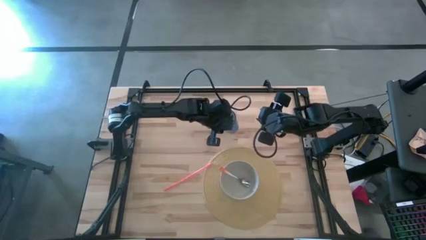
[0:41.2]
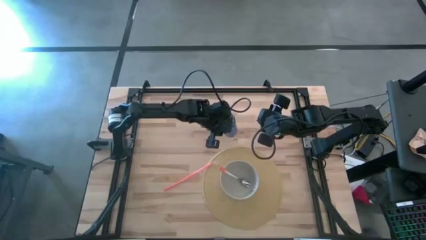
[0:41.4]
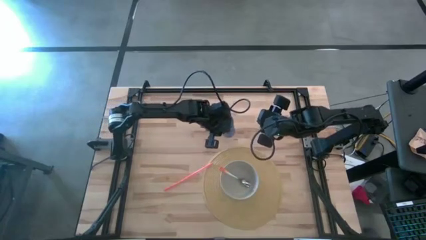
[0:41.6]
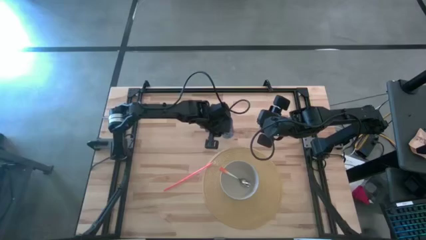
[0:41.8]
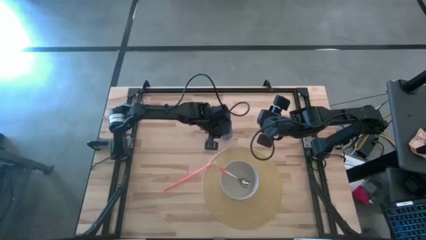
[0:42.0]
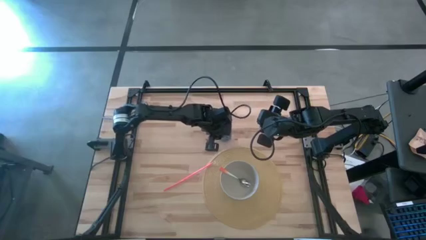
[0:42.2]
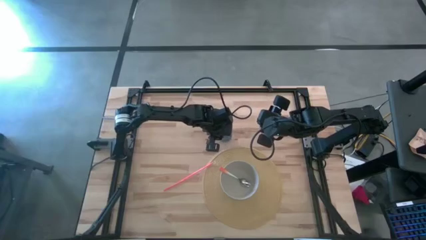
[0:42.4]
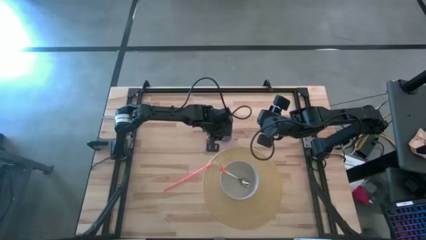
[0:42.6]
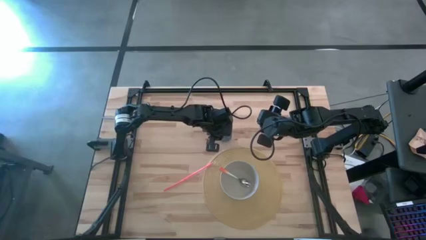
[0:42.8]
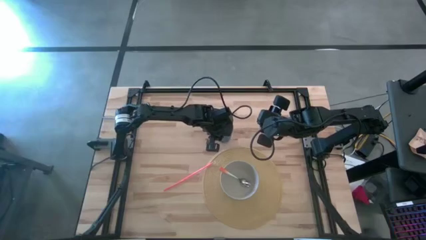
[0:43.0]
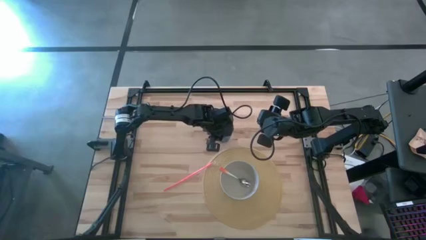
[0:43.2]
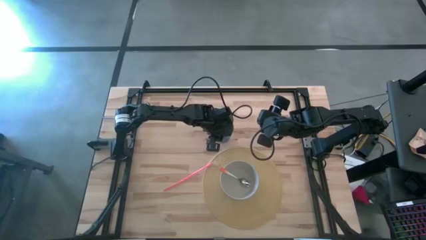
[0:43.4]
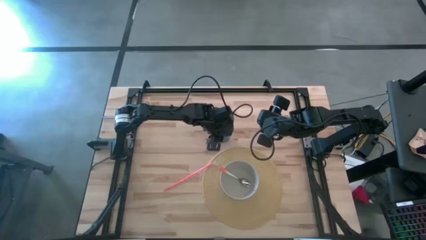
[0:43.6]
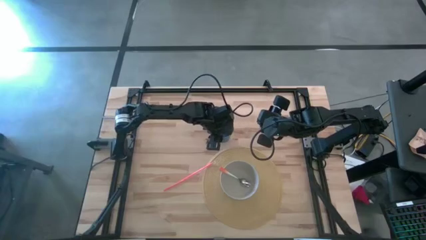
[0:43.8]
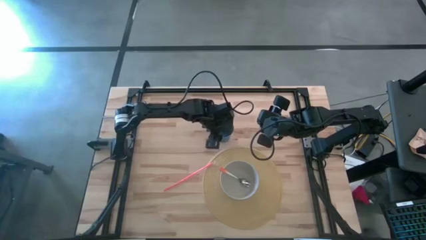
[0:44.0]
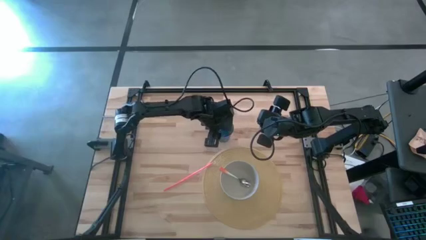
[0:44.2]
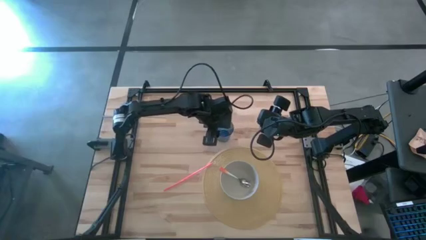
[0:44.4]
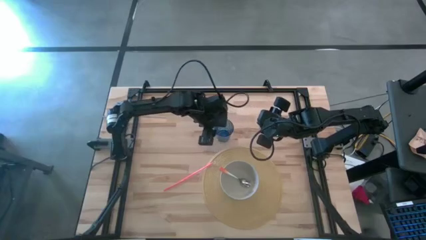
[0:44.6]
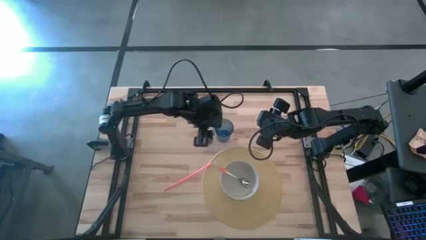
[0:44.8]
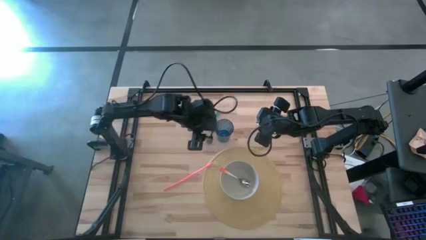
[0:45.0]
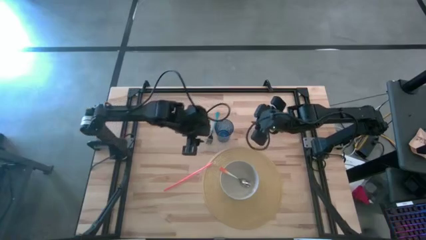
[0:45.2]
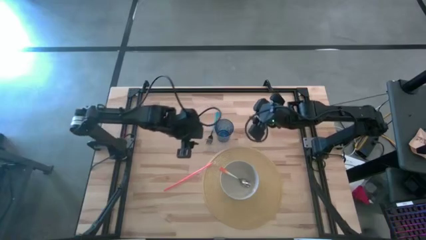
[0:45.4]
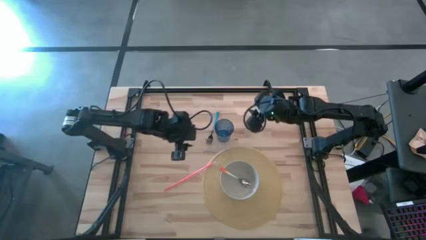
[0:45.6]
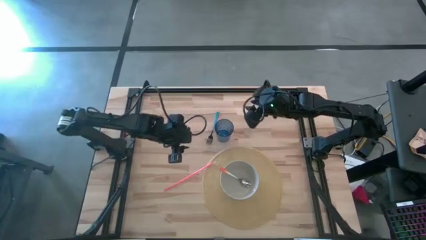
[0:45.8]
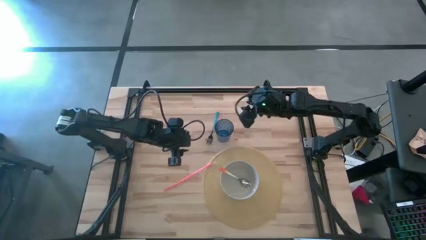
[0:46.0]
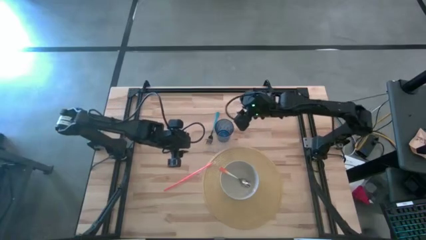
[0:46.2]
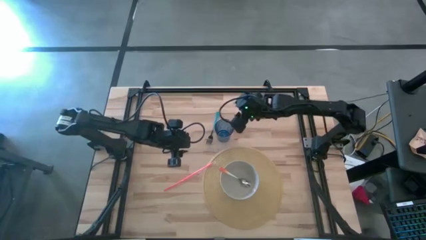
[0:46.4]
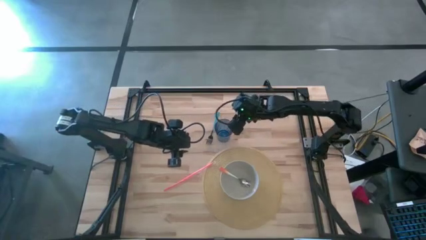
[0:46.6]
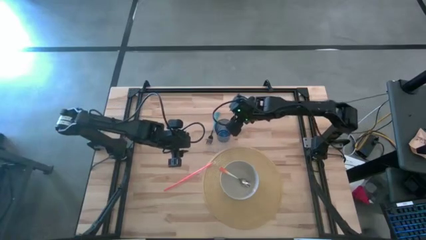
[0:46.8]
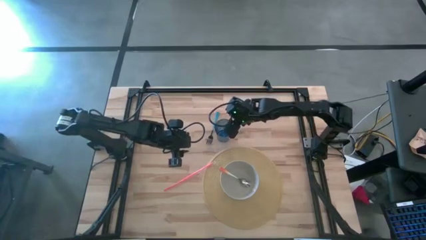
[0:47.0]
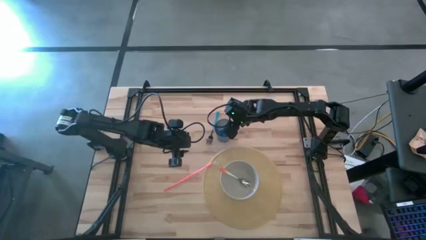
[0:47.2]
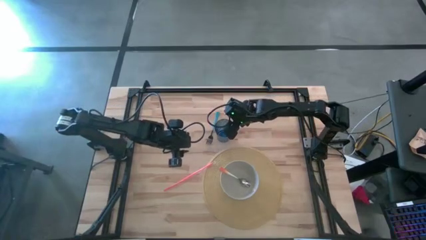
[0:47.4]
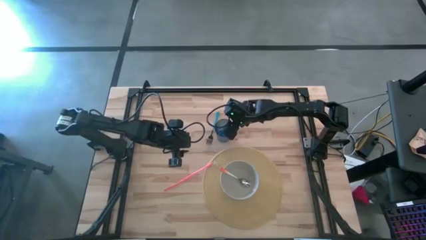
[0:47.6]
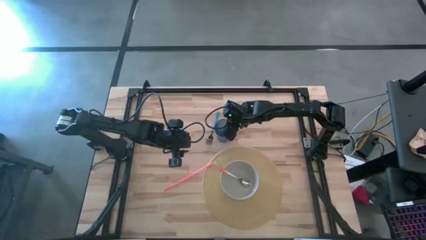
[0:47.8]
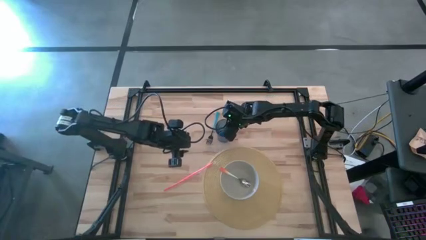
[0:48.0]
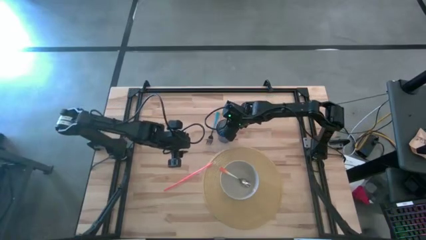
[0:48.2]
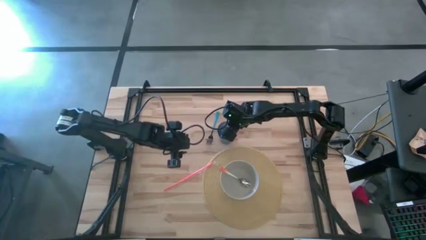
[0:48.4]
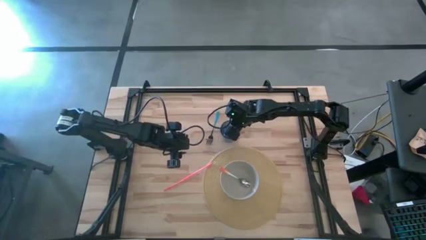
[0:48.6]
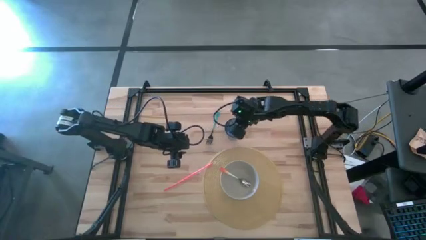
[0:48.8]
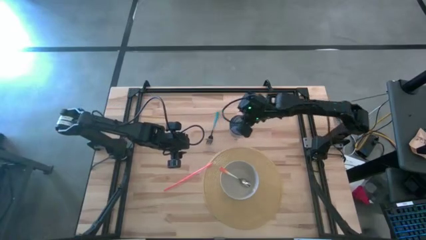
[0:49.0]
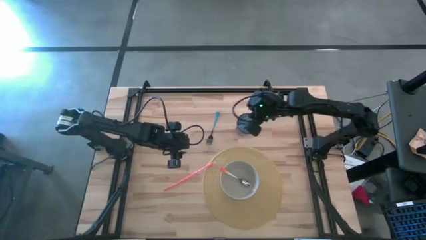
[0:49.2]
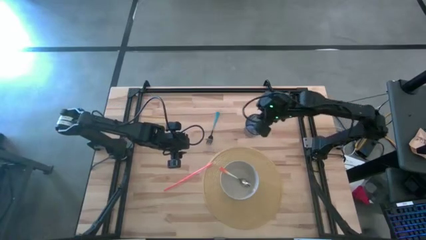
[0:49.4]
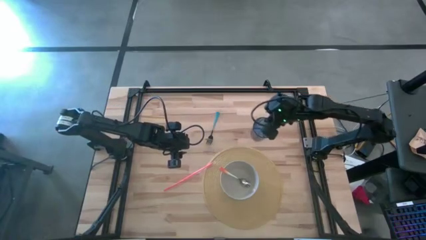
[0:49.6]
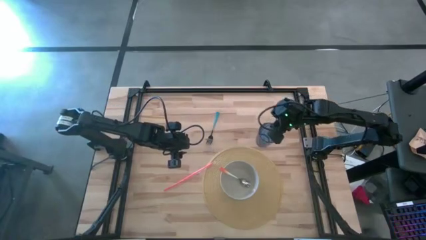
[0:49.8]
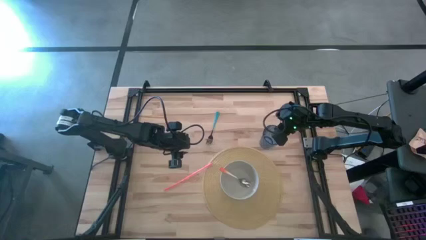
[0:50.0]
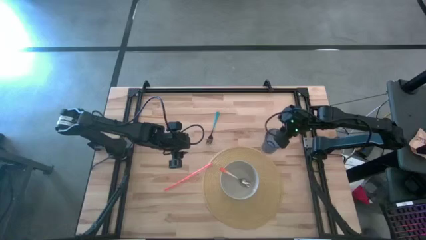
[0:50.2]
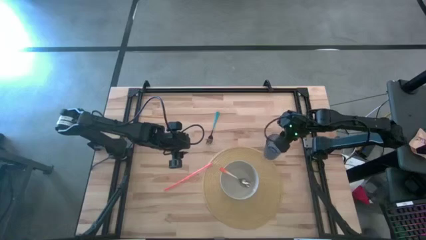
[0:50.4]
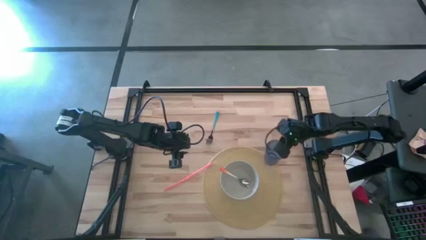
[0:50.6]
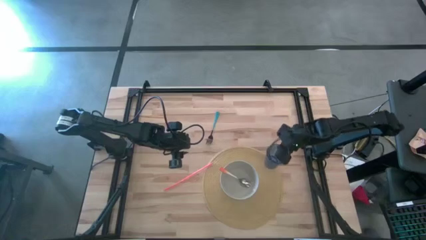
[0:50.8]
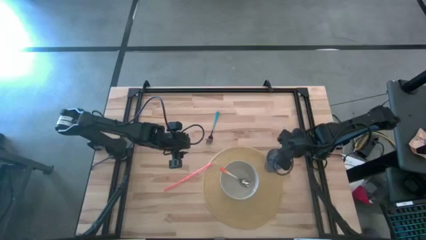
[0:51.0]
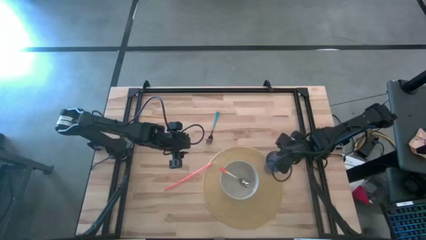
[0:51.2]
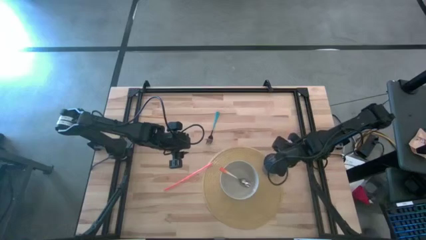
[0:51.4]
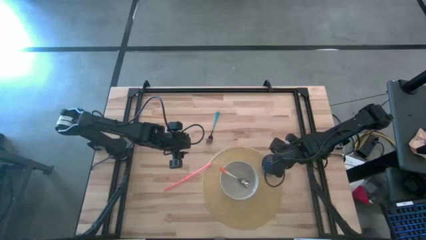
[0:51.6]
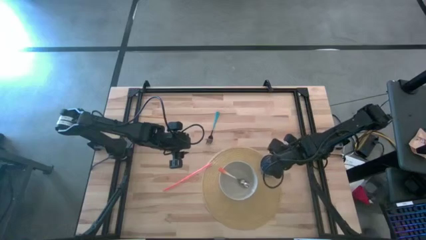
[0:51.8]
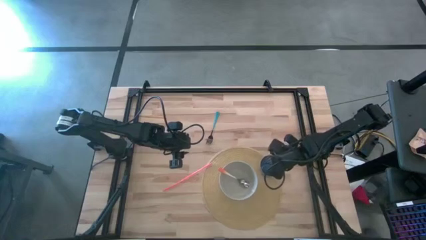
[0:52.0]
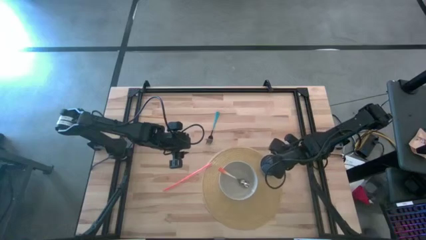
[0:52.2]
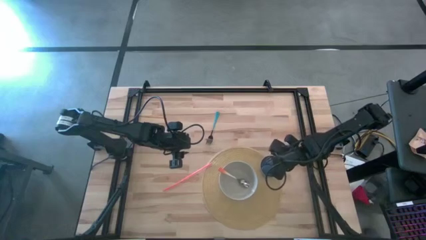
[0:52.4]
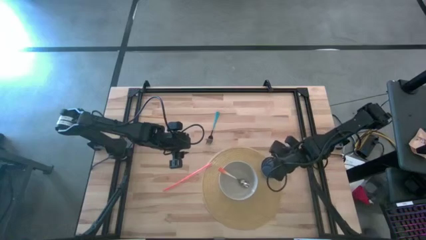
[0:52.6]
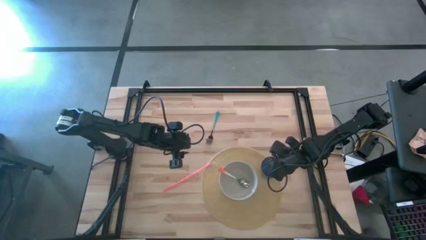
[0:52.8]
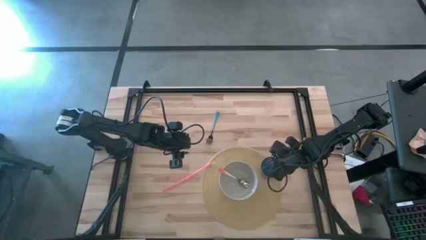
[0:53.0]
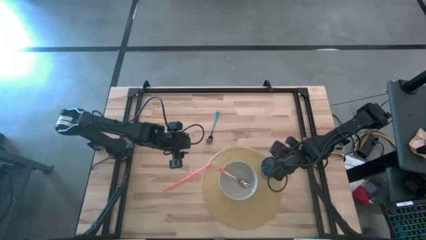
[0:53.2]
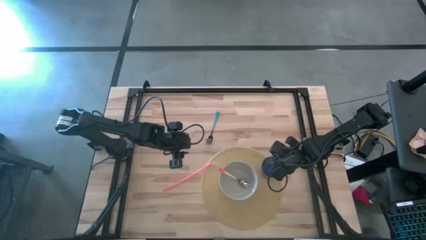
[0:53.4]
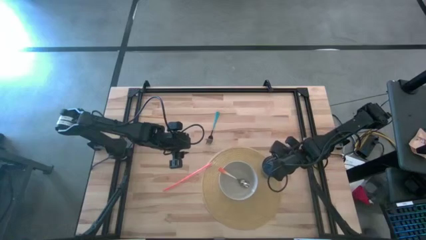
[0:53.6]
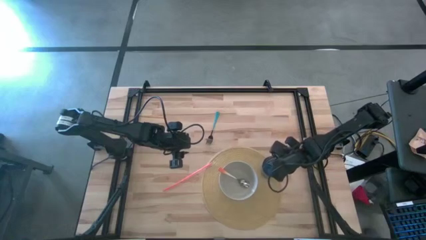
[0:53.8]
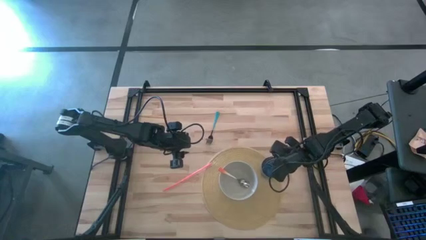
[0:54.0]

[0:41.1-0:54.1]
Task: Pick & Place Utensil
Put the blue cup on the yellow mat

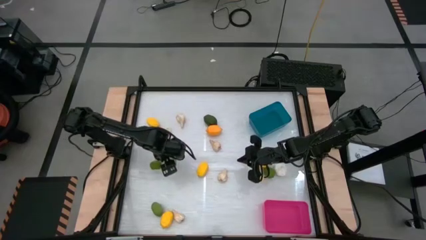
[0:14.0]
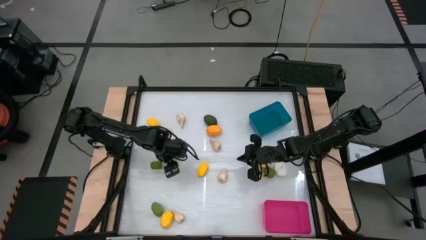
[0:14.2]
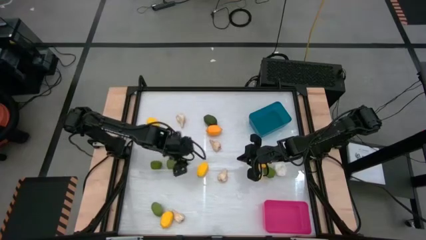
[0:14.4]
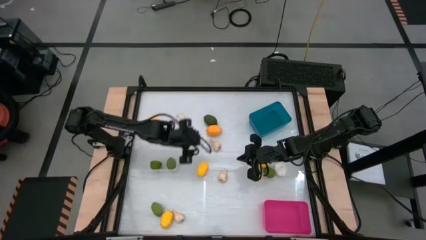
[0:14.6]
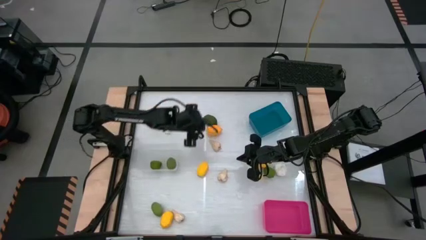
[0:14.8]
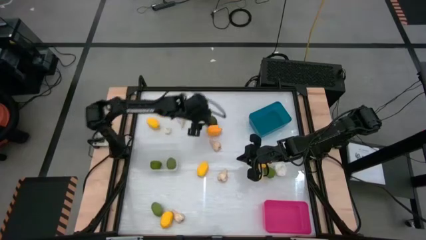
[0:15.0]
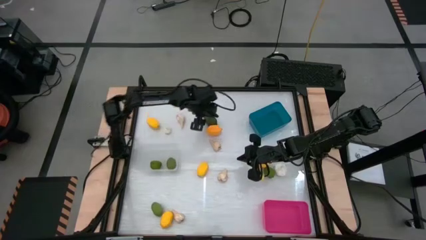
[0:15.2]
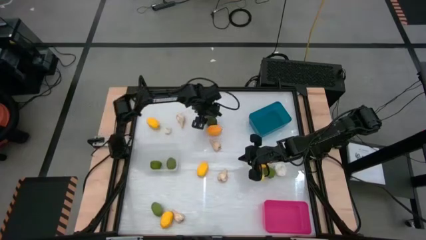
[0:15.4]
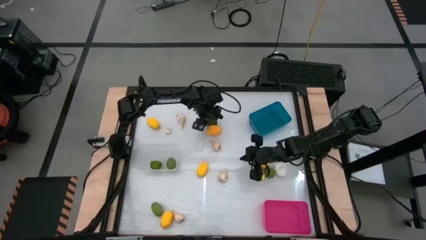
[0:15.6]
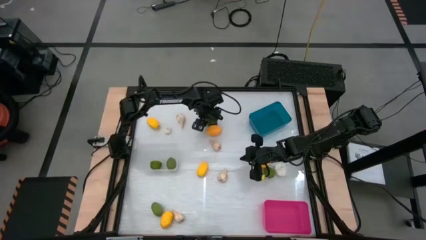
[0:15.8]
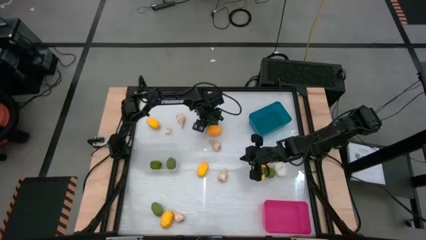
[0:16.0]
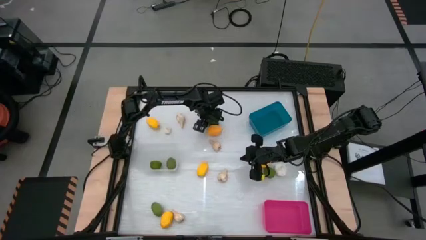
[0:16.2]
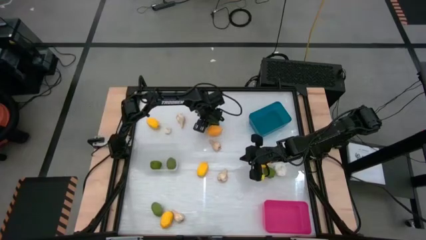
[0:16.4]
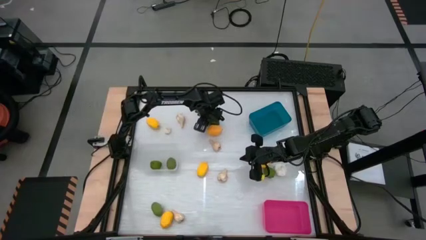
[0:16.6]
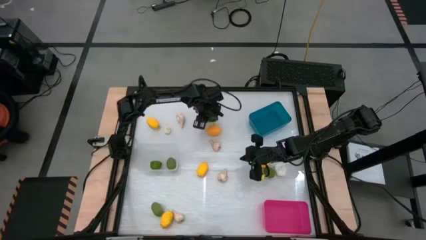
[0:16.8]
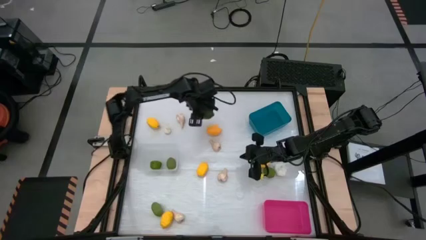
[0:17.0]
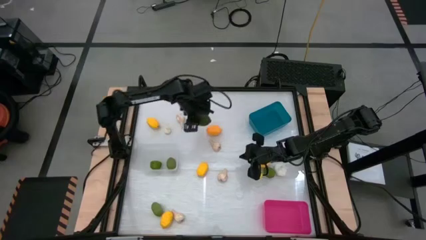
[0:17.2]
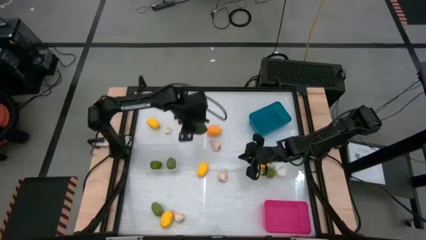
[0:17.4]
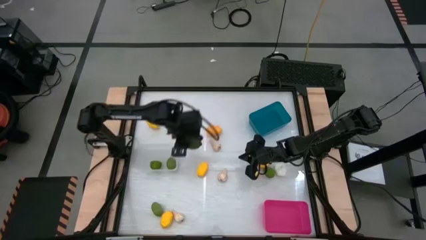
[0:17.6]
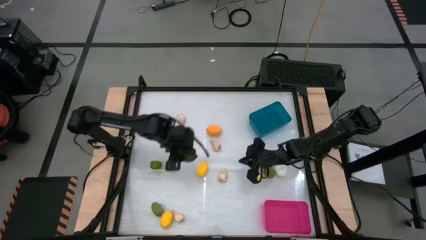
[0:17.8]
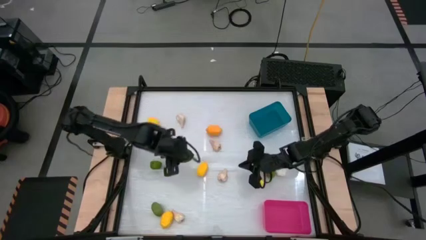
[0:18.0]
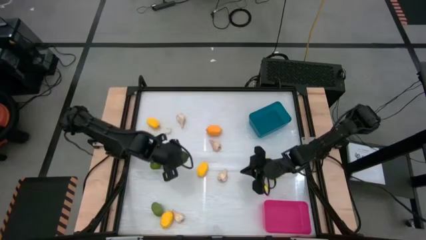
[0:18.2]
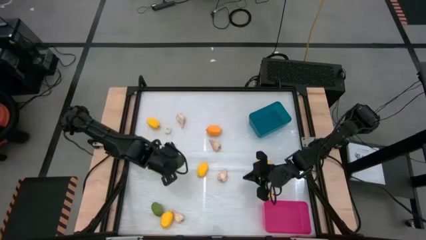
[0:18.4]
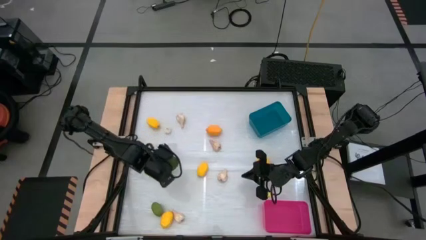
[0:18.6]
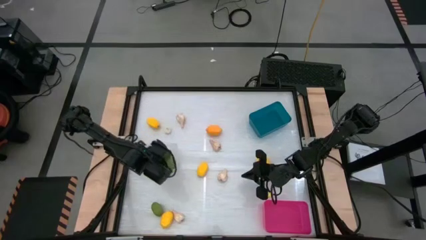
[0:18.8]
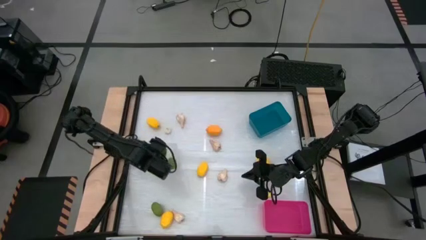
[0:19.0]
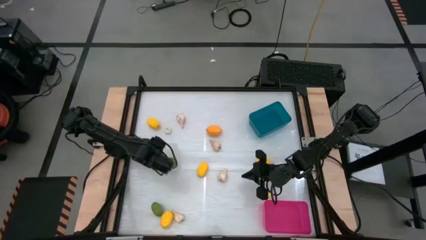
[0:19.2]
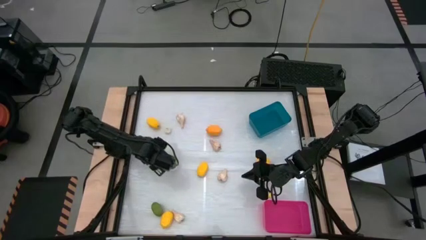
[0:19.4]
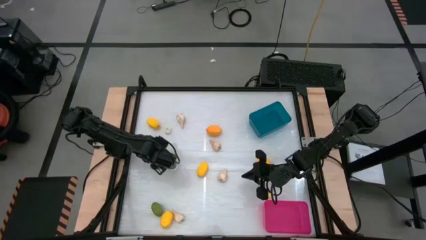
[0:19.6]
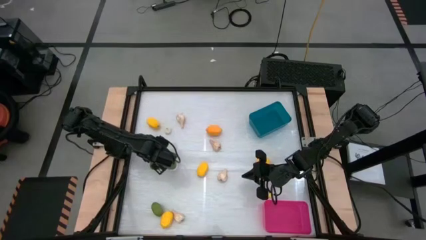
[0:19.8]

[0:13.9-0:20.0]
Task: Sort produce into baskets
Put the green lime into the transparent bin
